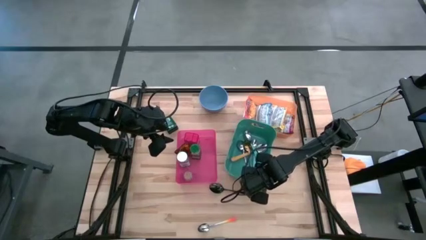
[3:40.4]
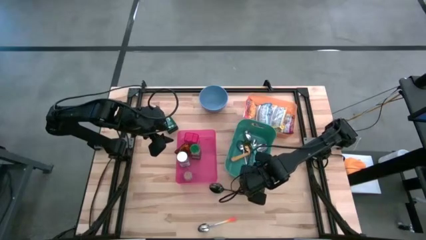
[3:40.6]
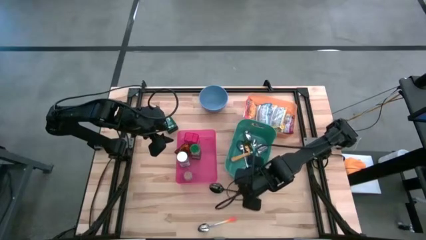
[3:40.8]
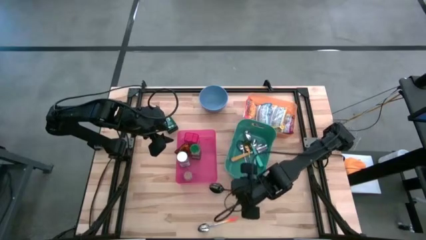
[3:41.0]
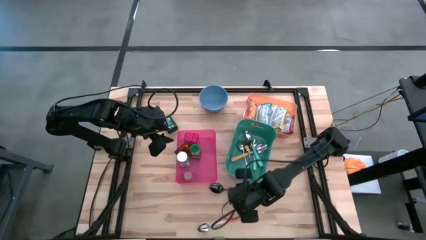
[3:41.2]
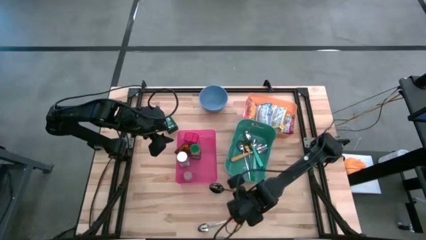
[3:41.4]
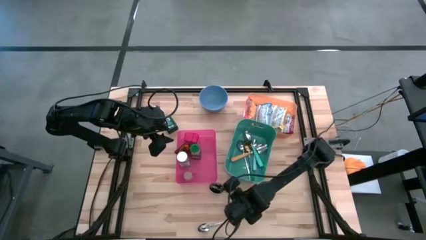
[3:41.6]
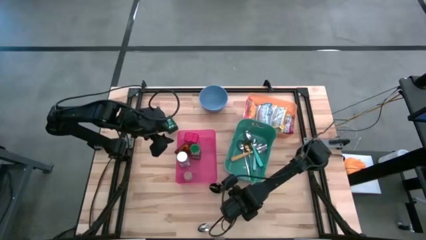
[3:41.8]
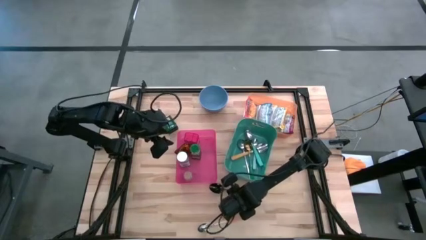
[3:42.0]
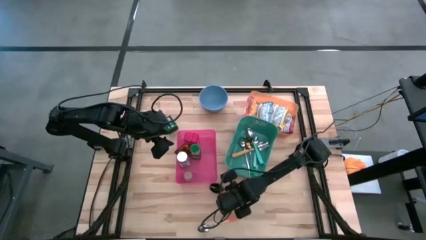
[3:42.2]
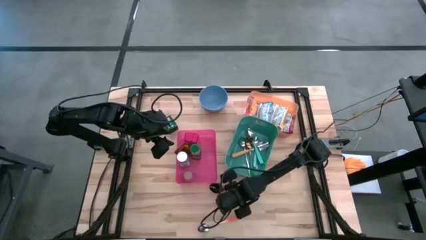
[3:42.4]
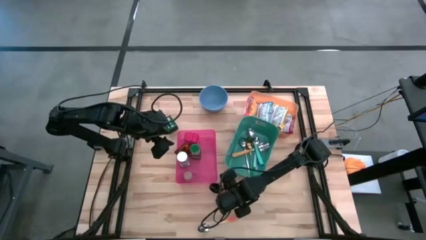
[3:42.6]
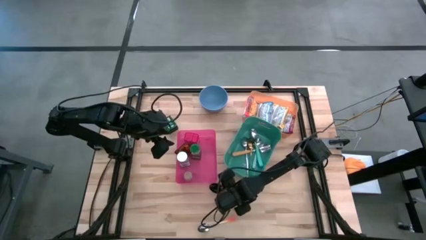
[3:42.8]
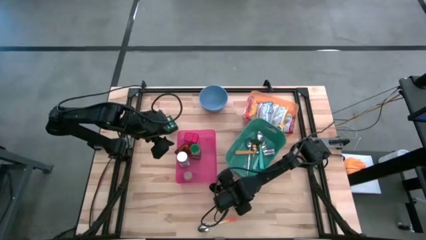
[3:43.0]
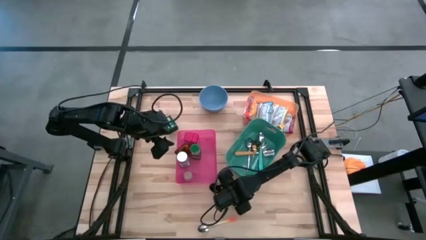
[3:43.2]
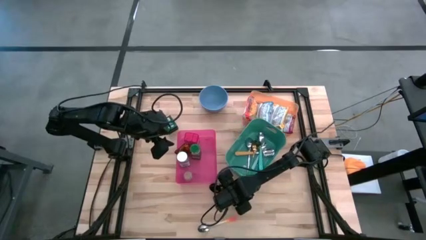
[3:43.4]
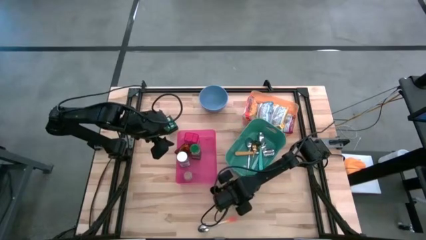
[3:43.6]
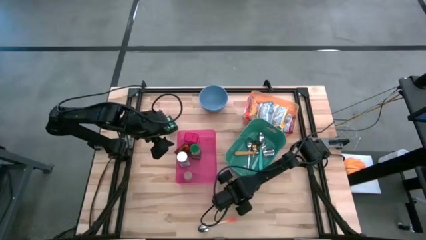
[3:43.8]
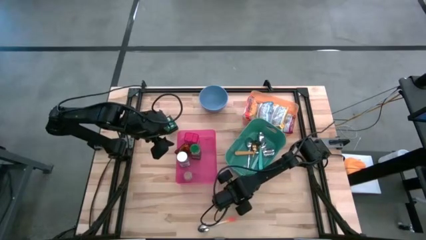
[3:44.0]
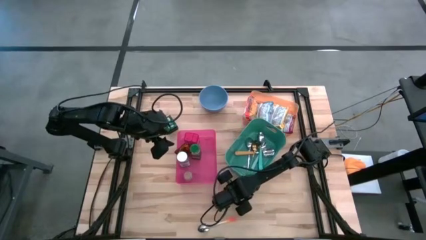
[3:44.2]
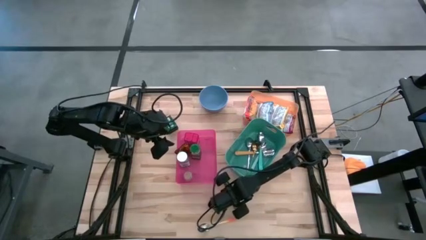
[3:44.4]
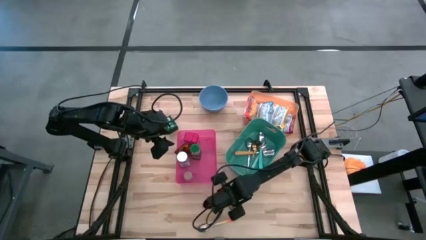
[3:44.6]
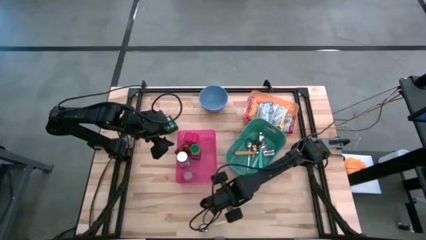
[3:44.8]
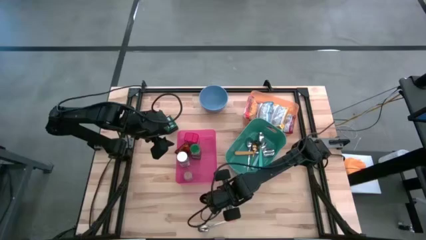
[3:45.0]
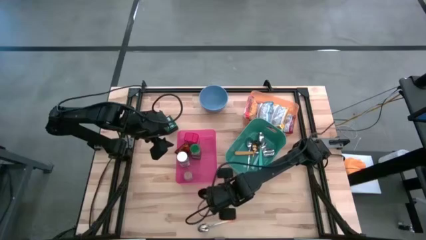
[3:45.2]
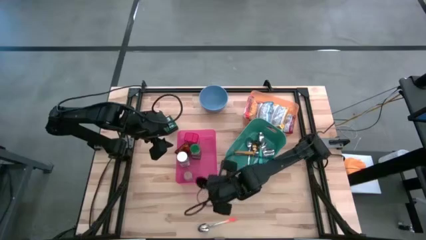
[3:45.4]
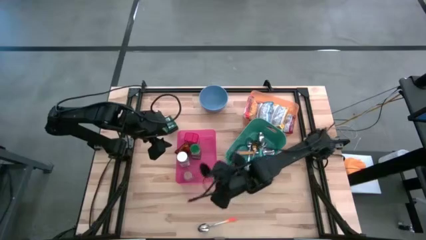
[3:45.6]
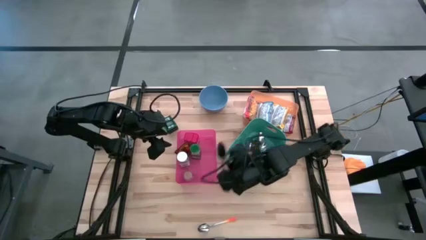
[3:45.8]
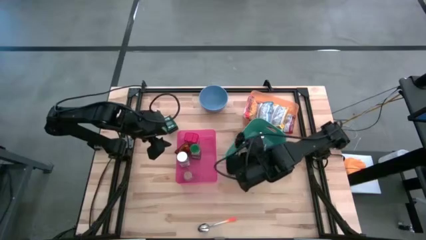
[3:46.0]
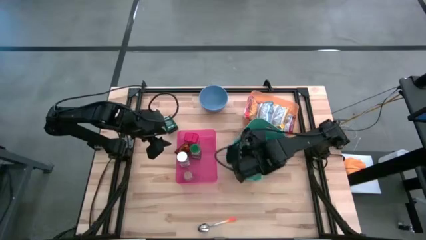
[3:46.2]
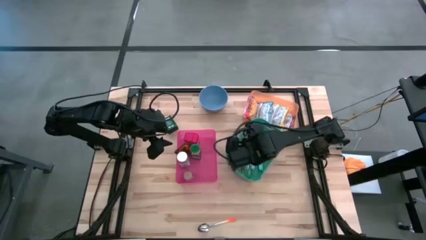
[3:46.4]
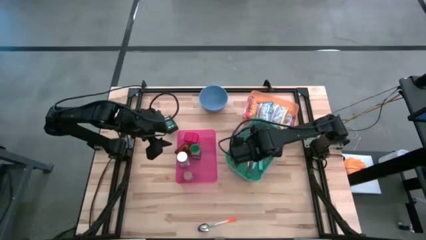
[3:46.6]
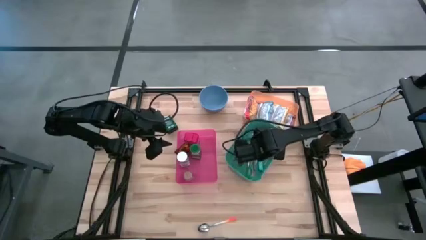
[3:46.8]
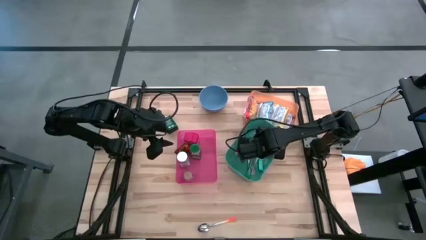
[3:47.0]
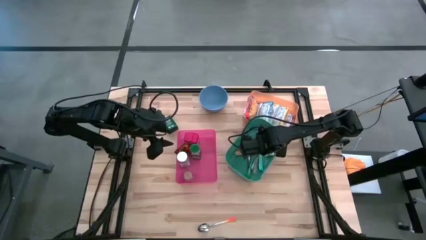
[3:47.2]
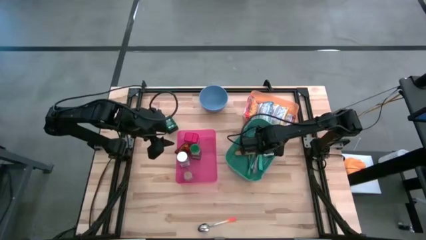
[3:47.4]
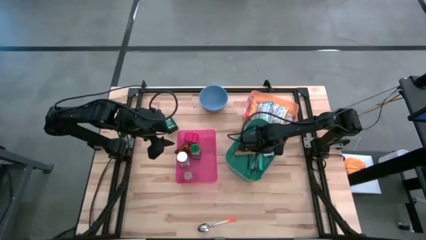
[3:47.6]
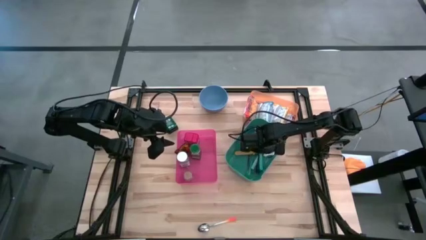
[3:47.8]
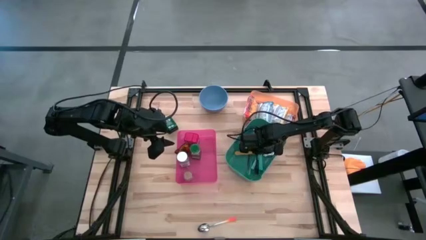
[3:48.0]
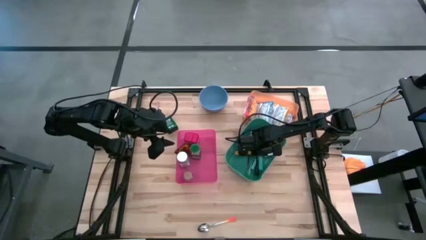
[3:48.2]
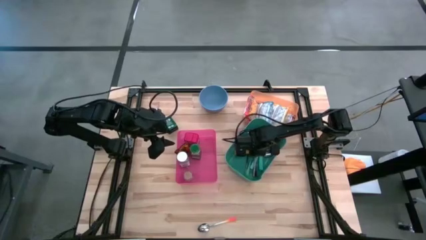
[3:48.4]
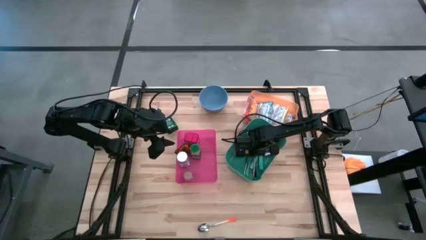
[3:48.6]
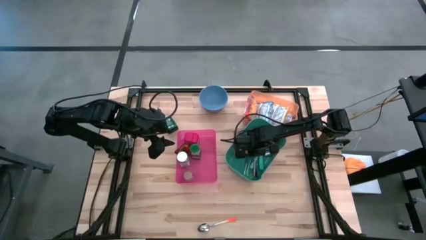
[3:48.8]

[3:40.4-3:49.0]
Put the black spoon into the green bin

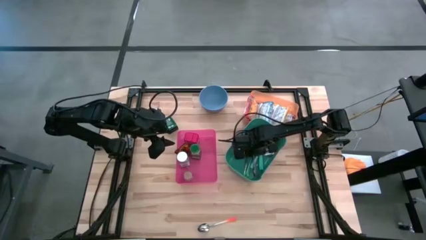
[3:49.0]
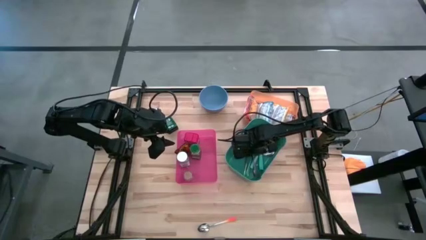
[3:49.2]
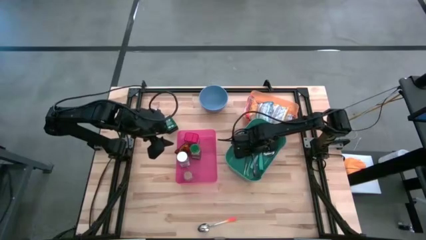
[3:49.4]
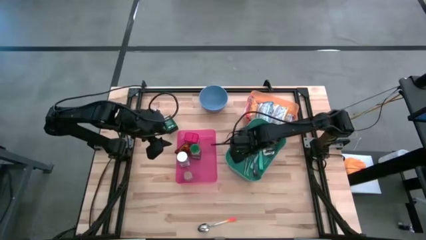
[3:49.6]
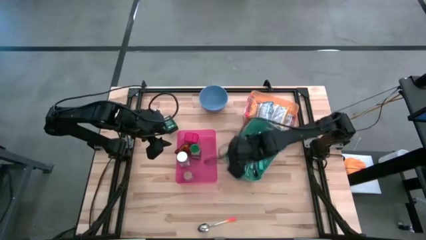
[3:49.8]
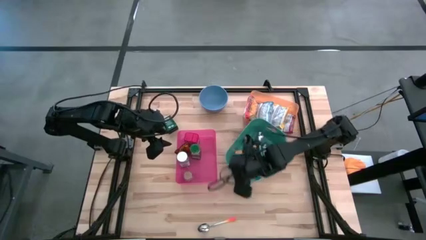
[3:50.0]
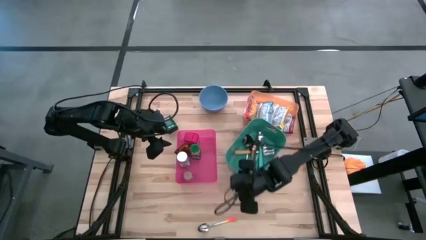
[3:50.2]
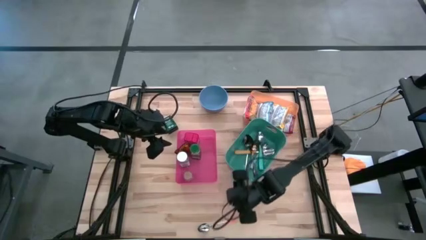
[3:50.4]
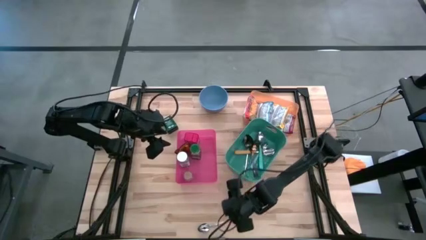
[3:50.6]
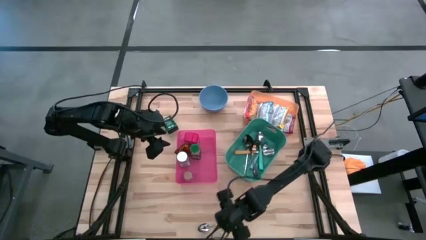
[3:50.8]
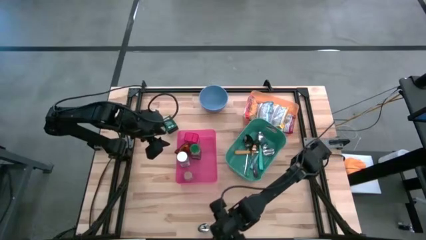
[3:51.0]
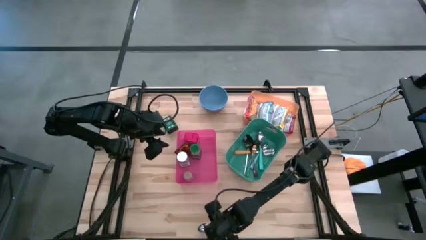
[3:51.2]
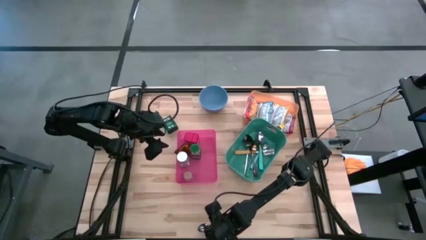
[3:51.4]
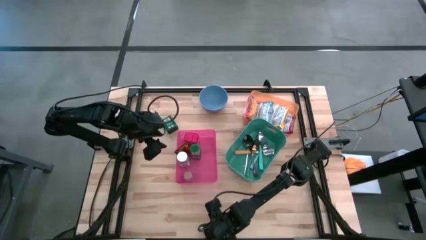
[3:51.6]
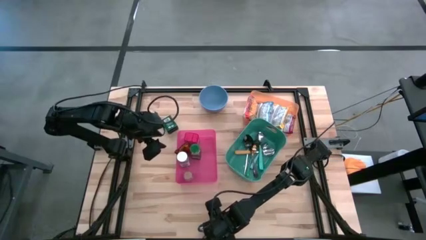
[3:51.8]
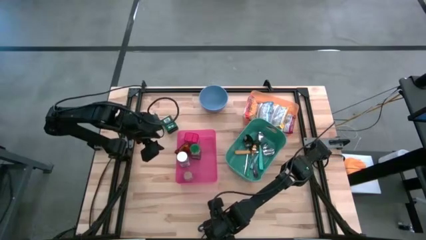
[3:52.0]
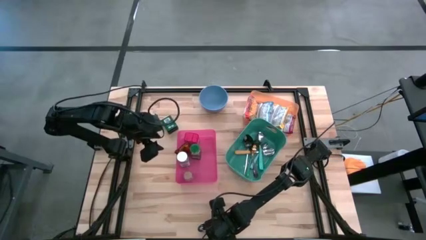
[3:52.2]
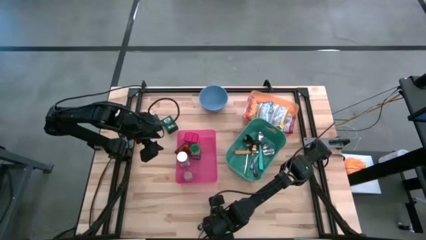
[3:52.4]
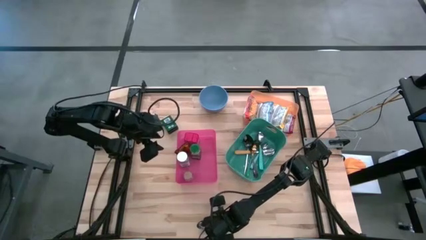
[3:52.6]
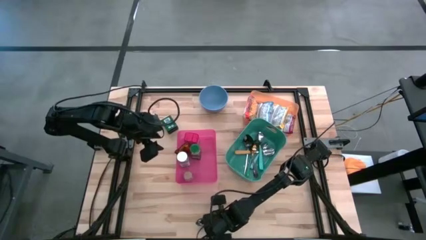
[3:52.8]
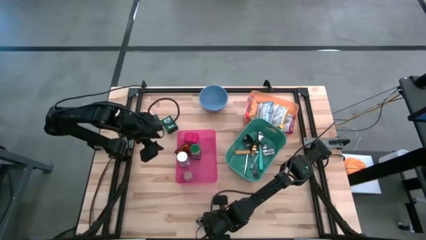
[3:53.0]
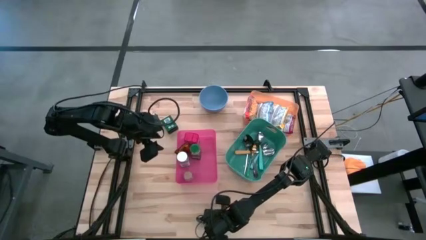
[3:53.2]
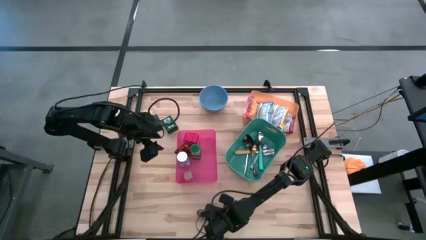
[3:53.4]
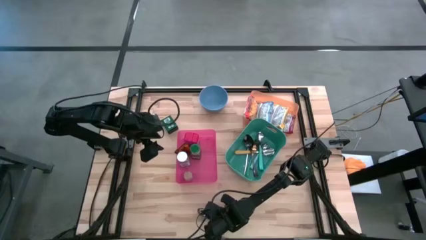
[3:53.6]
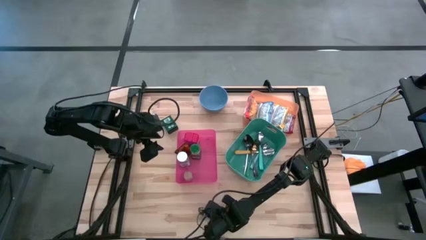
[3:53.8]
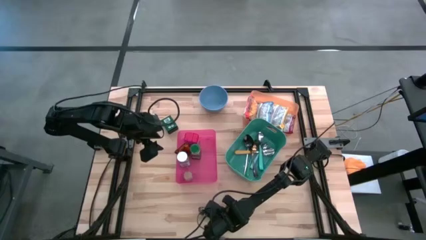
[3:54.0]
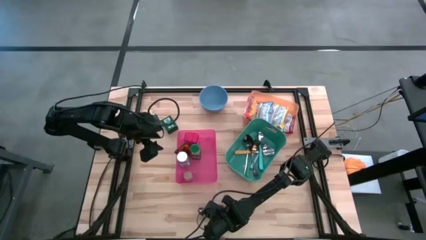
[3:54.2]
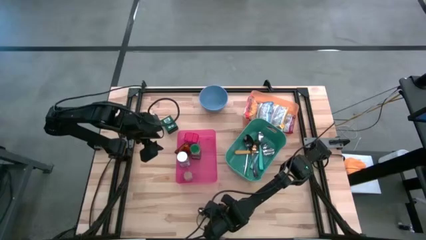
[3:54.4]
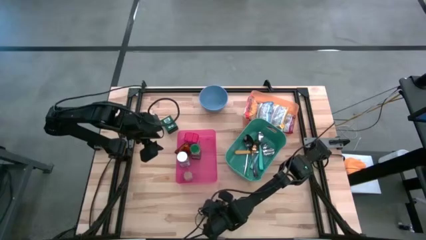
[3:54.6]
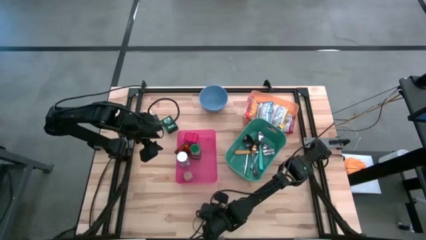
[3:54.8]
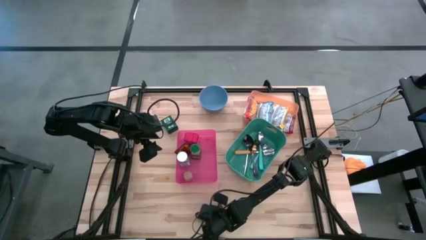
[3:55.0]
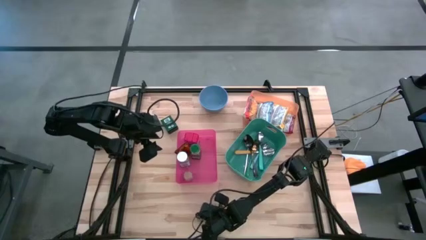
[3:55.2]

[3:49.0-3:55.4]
Put the white and orange spoon into the green bin
